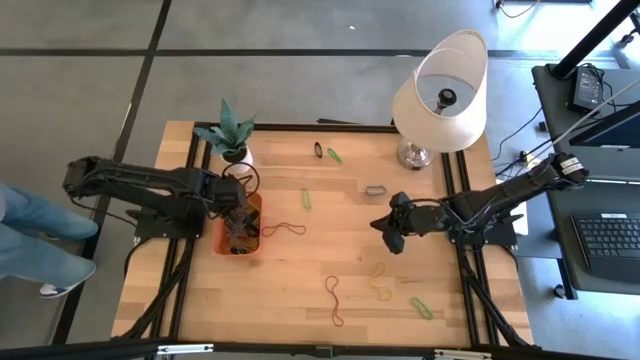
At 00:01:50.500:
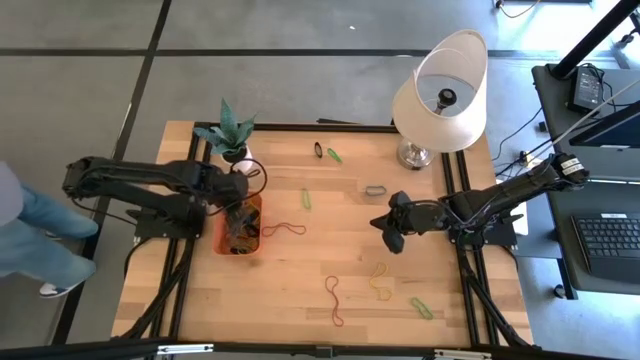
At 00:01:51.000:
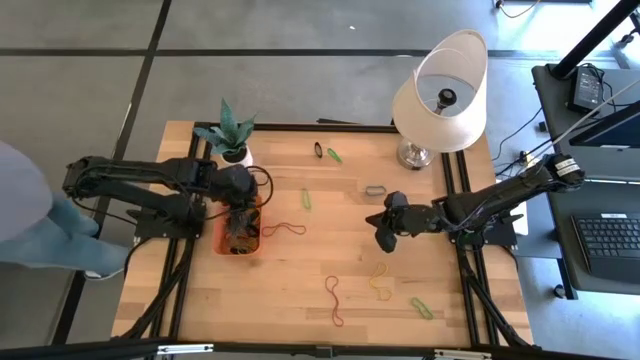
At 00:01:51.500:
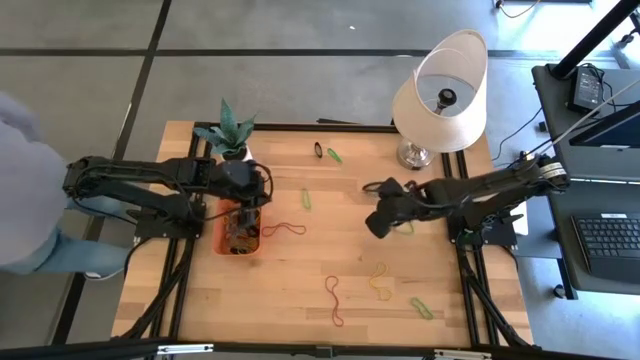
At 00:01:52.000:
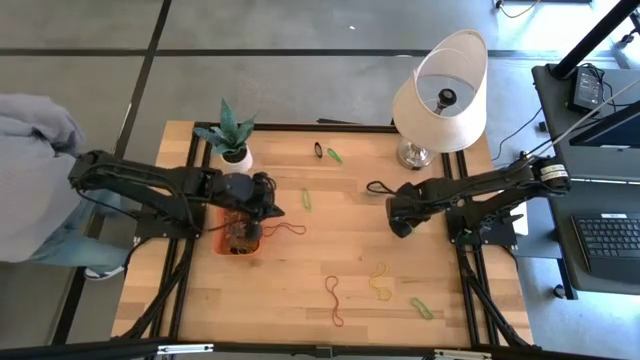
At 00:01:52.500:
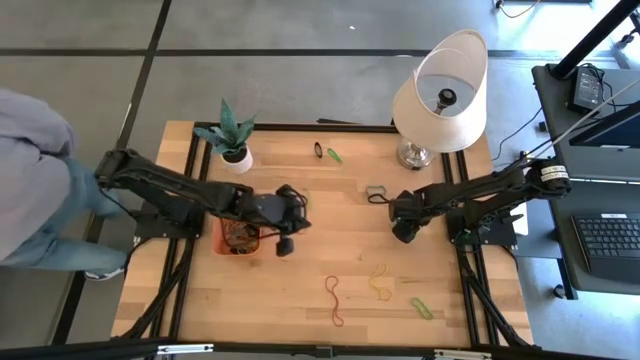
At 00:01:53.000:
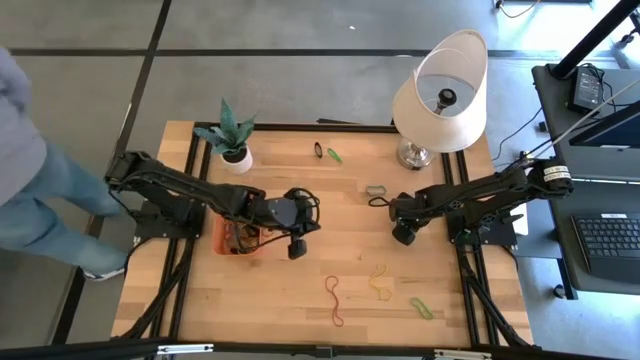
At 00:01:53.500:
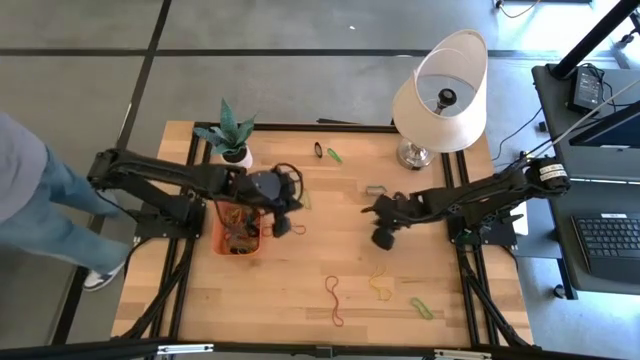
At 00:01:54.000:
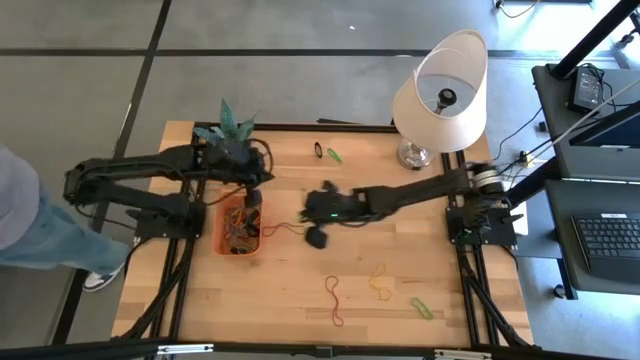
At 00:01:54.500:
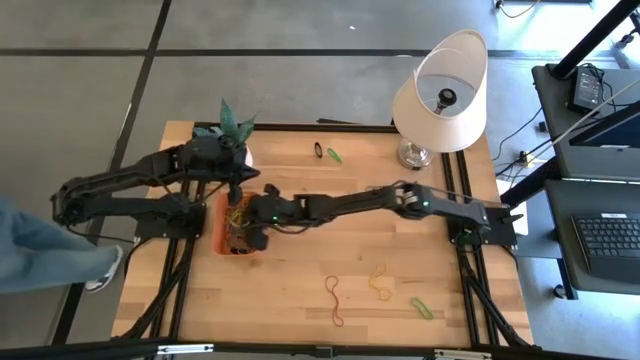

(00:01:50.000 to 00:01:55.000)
Task: Pick and place rubber bands into bin
Put the green rubber band into the orange bin

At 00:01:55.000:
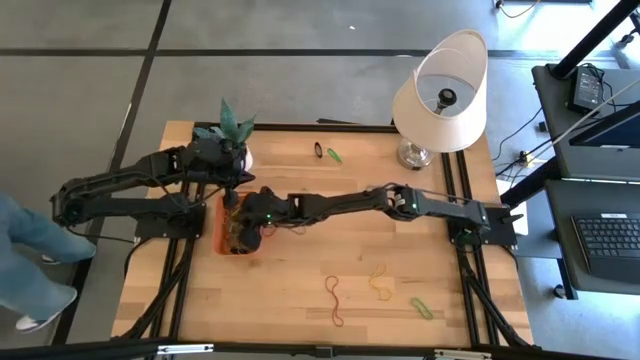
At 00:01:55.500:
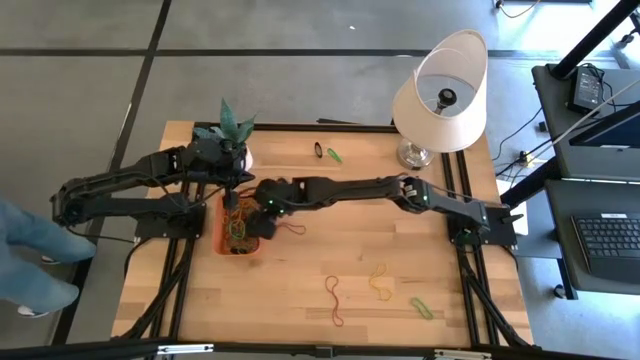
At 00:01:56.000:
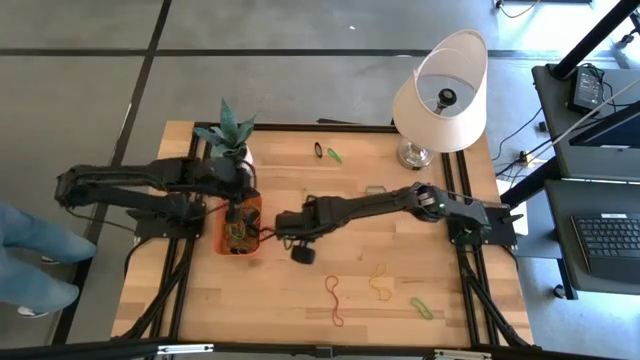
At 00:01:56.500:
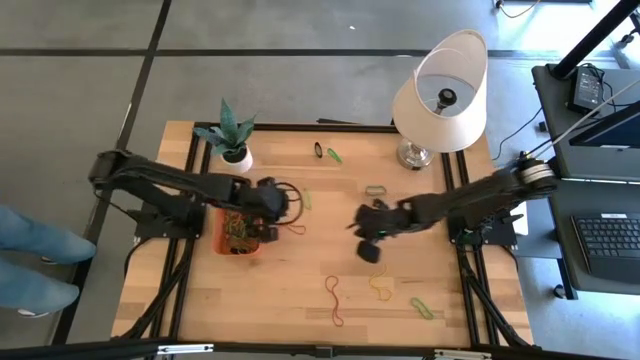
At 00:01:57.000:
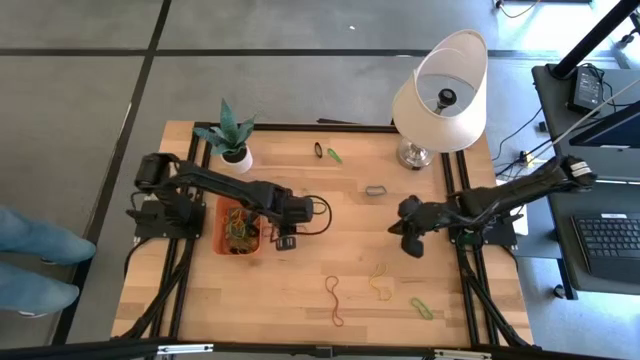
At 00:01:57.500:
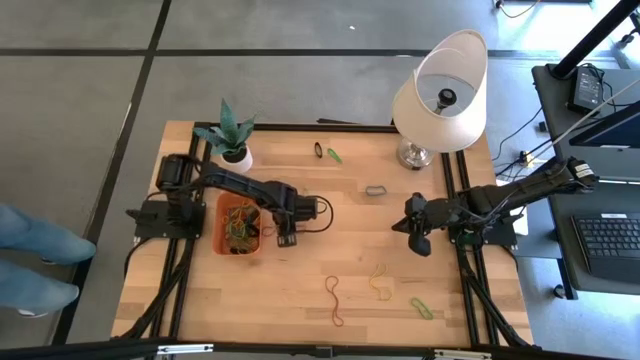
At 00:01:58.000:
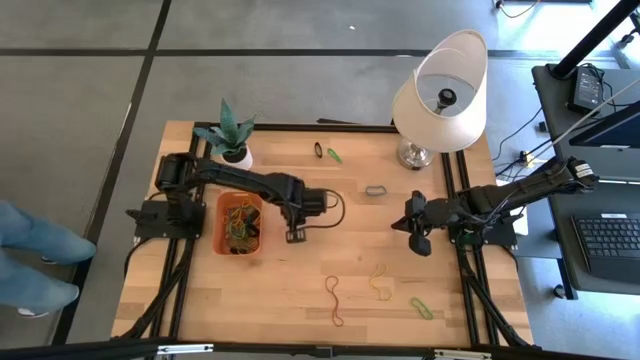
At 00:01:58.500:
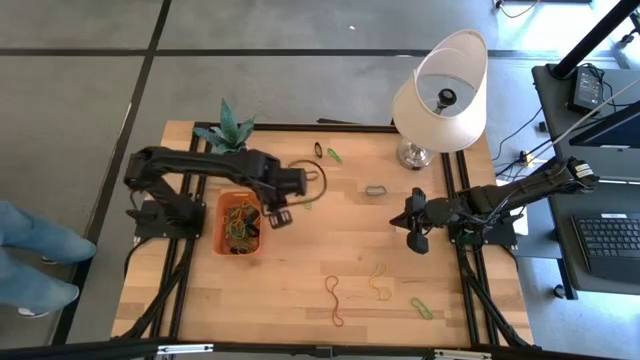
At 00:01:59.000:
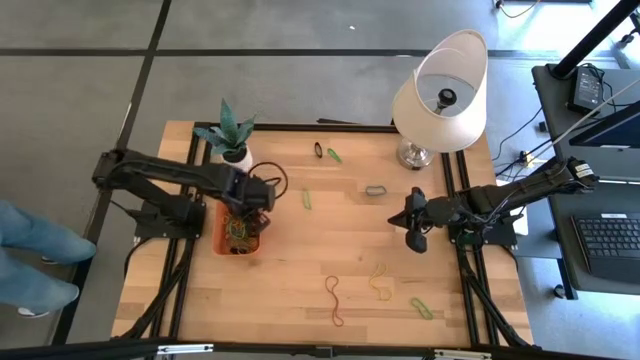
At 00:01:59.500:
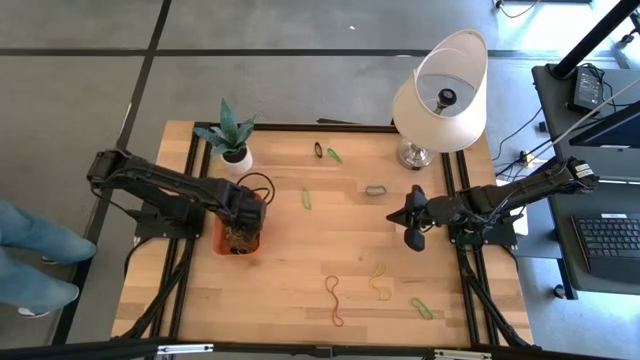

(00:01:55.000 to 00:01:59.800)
Put the red rubber band into the orange bin

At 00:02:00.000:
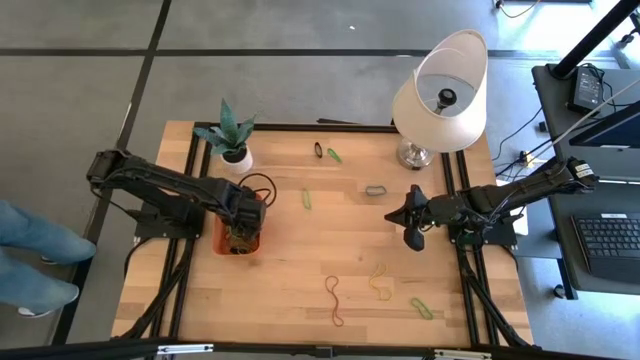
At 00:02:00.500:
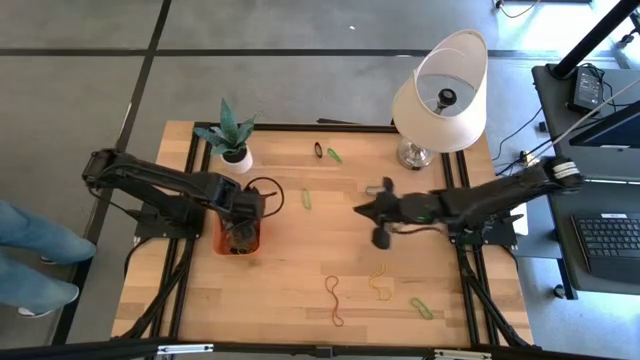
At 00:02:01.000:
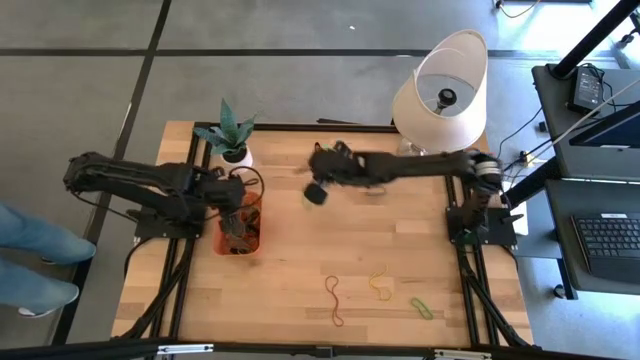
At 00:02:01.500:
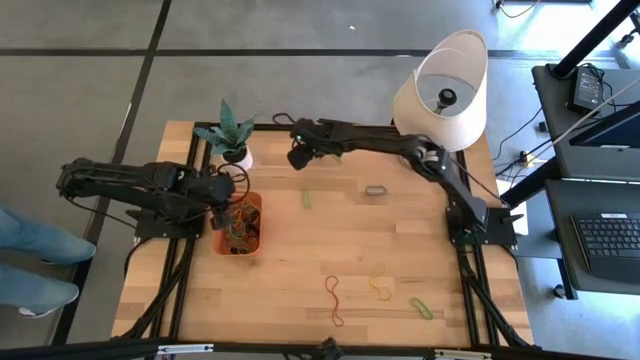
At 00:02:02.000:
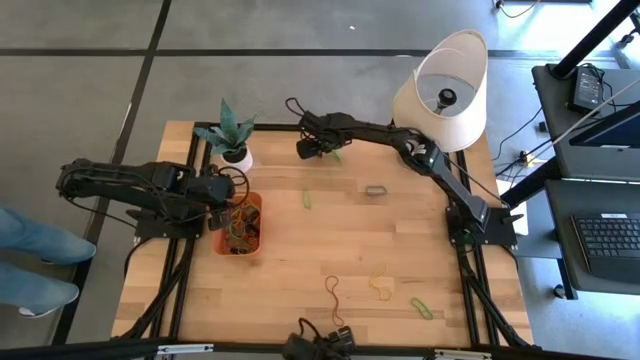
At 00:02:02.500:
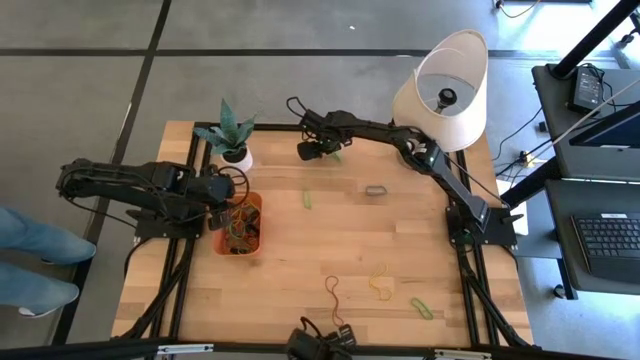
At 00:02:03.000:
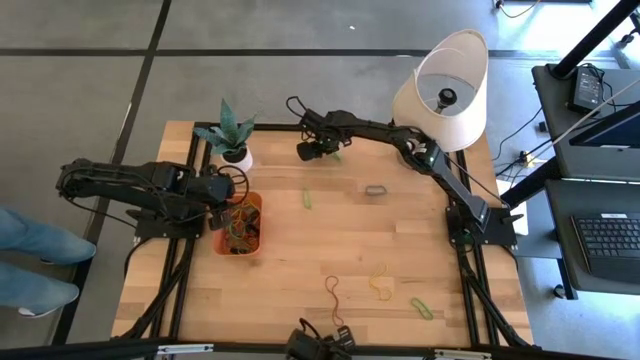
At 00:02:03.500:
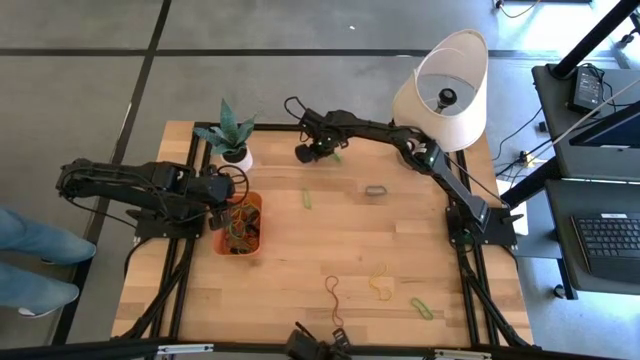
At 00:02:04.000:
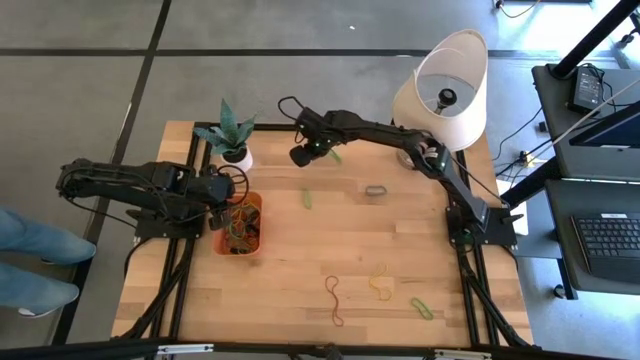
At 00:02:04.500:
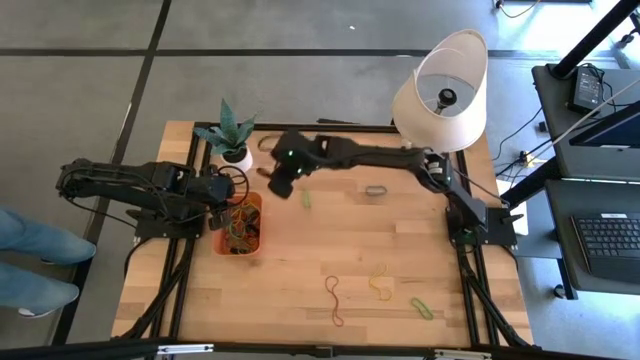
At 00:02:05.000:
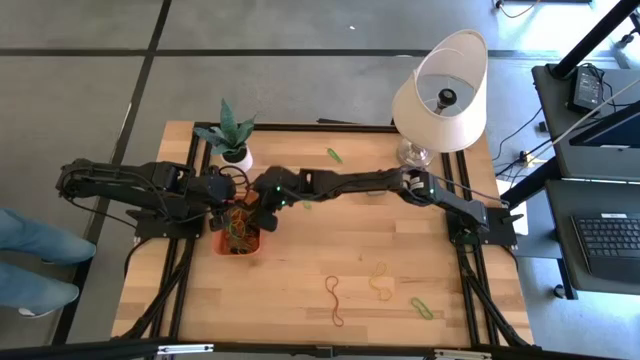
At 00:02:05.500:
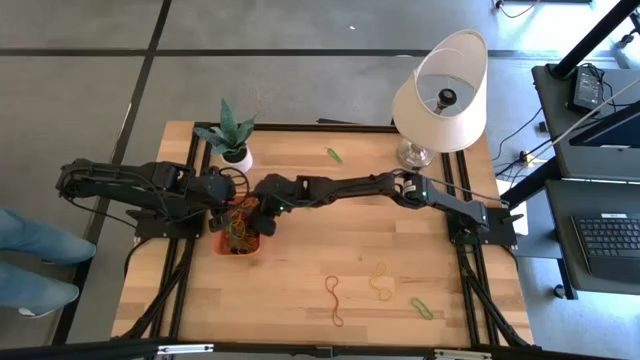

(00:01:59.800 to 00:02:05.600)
Put the black rubber band into the orange bin

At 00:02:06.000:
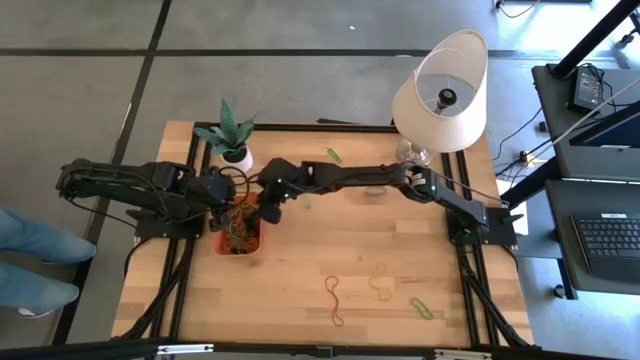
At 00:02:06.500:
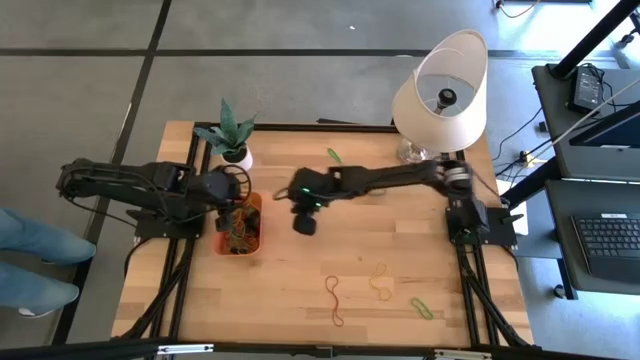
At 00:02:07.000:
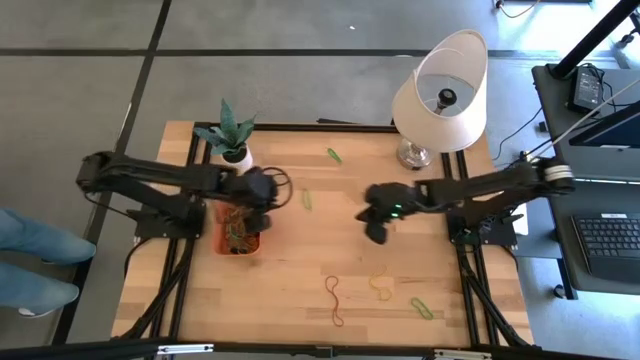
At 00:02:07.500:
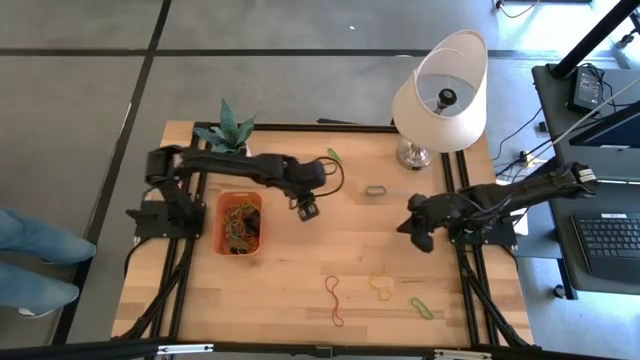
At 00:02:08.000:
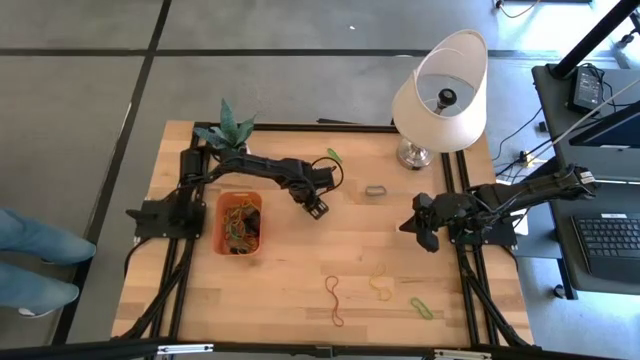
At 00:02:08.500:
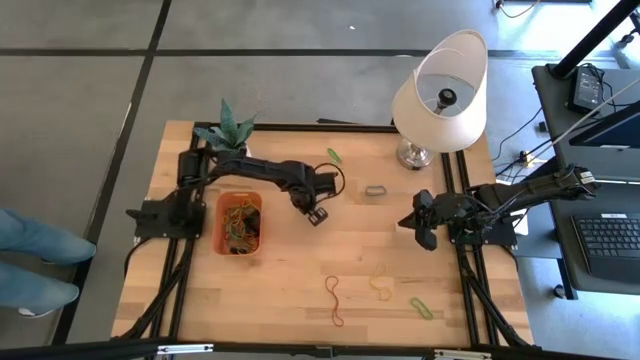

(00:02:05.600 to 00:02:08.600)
Put the green rubber band into the orange bin

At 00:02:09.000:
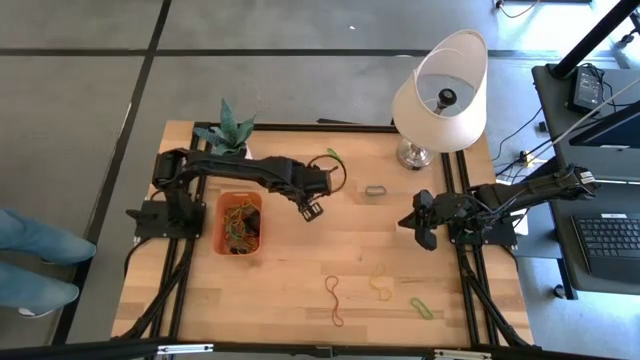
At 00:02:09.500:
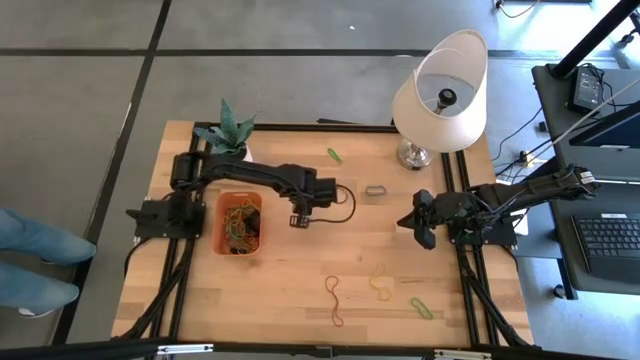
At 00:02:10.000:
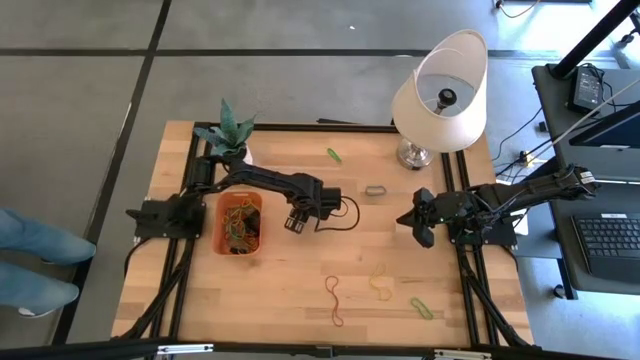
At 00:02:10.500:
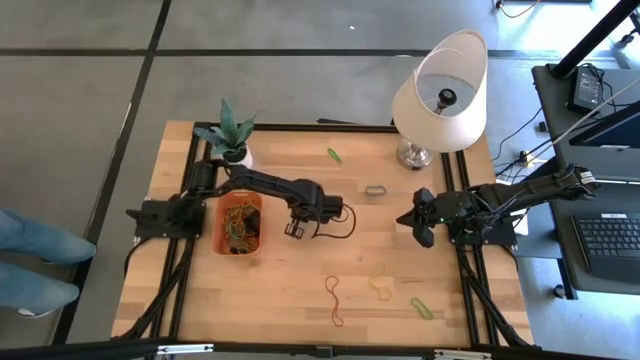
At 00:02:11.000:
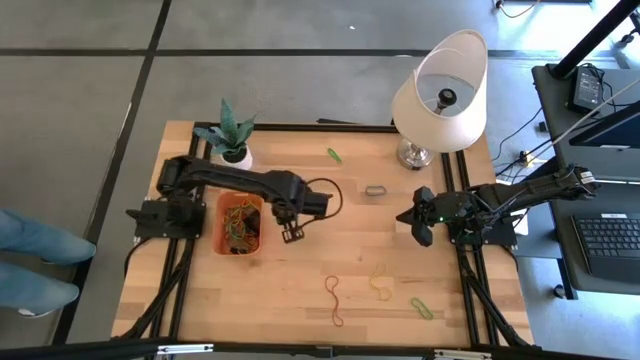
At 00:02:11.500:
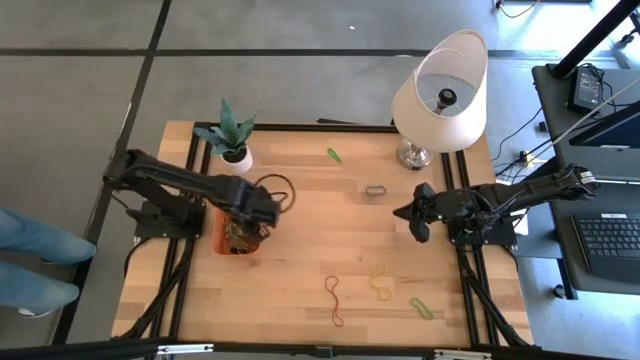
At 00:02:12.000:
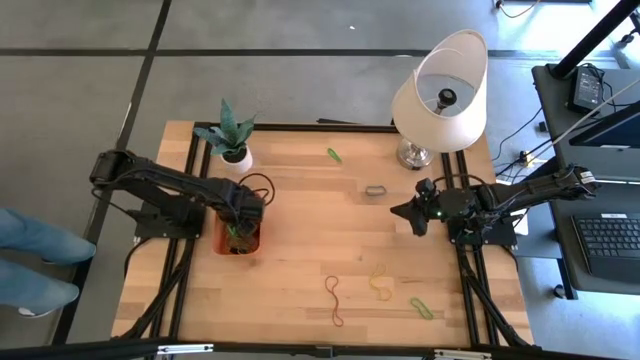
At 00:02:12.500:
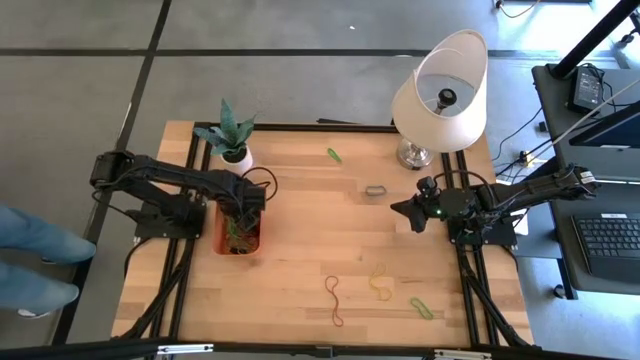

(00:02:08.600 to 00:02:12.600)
Put the green rubber band into the orange bin
